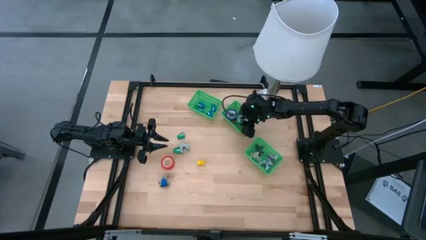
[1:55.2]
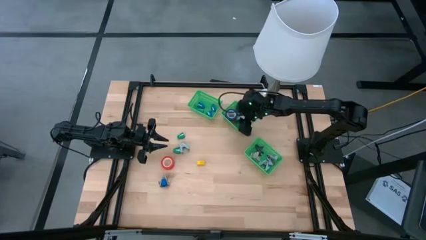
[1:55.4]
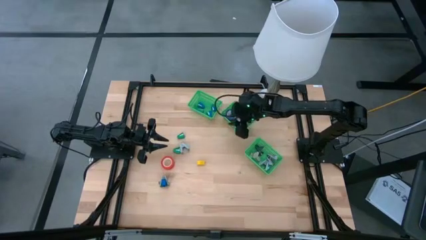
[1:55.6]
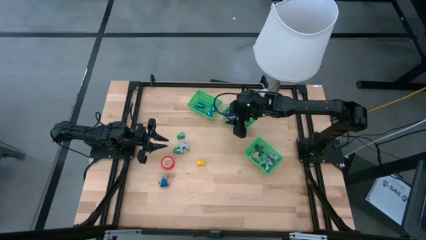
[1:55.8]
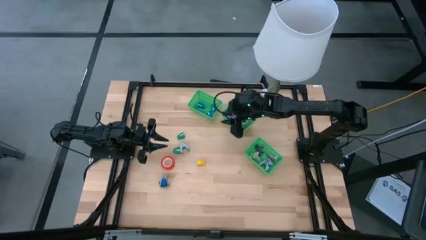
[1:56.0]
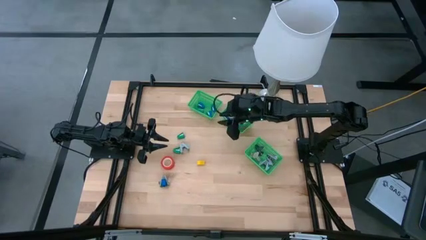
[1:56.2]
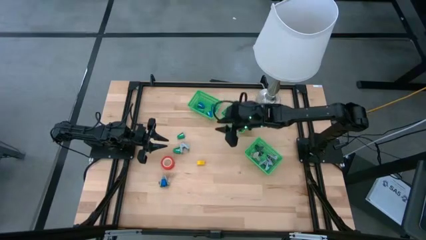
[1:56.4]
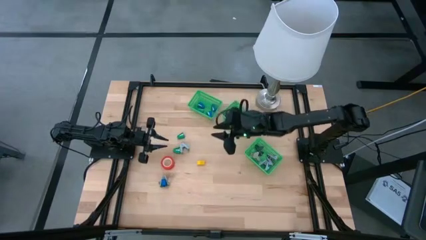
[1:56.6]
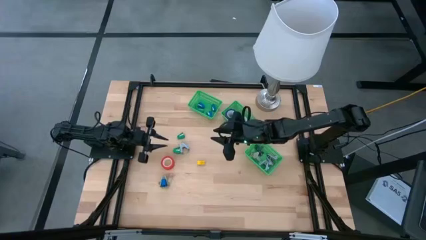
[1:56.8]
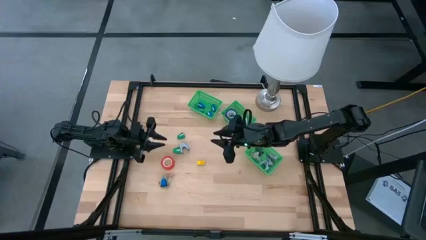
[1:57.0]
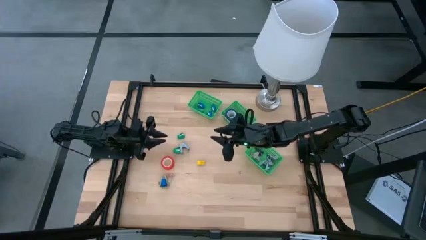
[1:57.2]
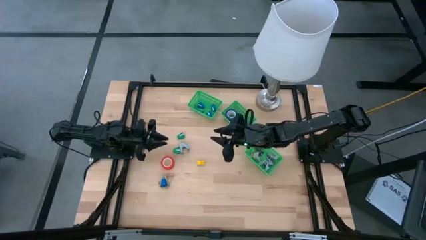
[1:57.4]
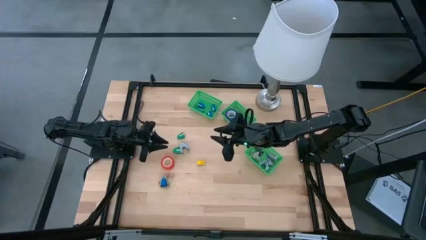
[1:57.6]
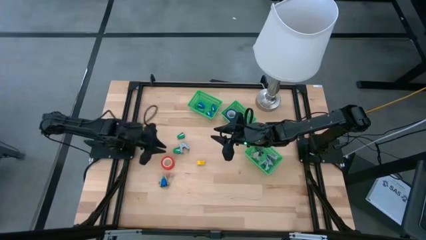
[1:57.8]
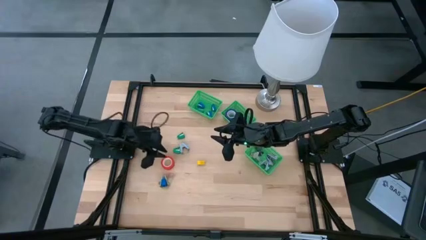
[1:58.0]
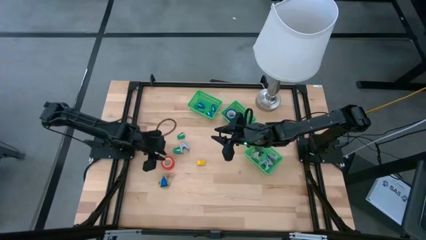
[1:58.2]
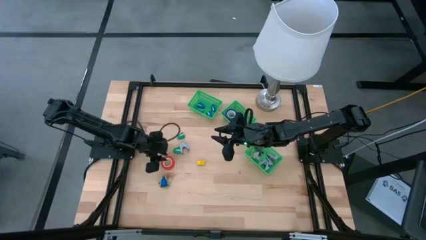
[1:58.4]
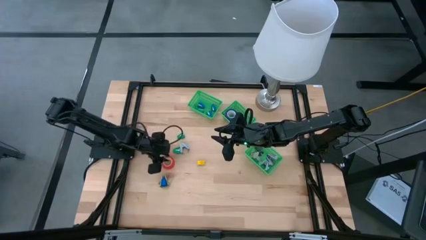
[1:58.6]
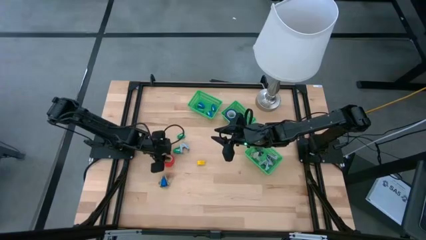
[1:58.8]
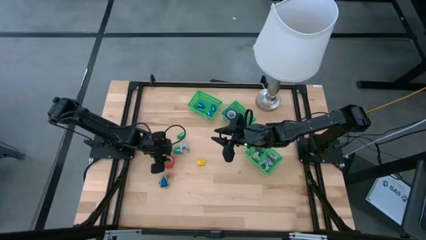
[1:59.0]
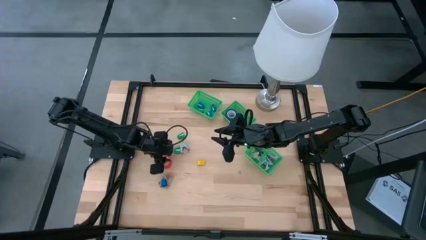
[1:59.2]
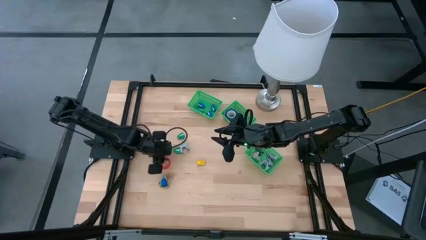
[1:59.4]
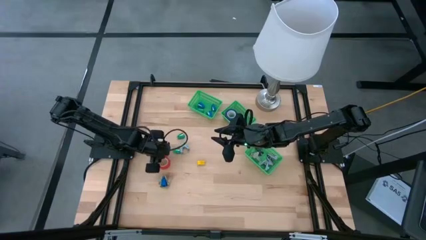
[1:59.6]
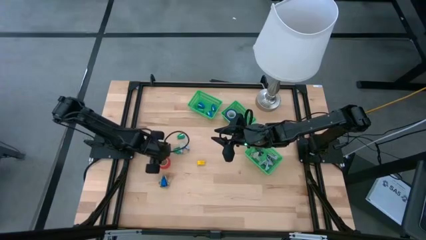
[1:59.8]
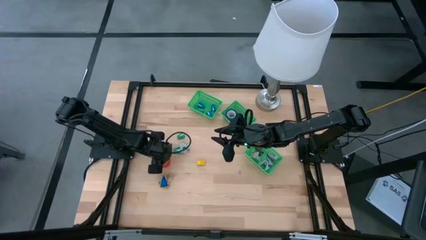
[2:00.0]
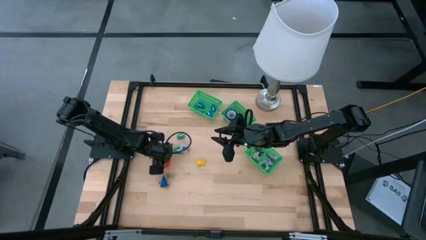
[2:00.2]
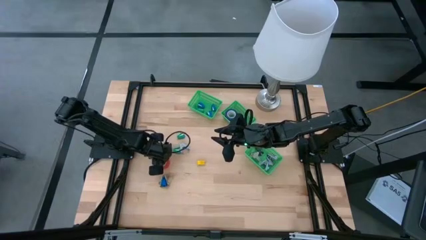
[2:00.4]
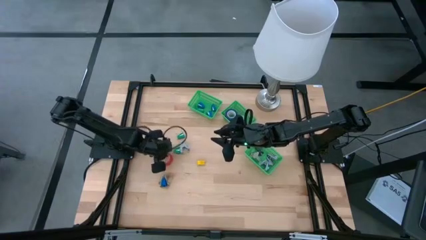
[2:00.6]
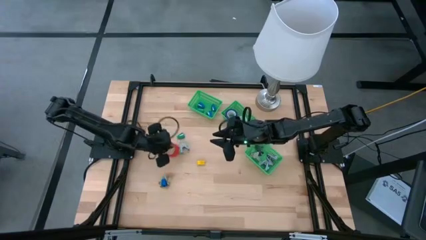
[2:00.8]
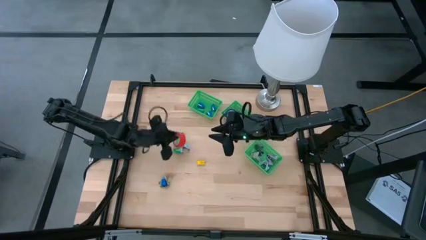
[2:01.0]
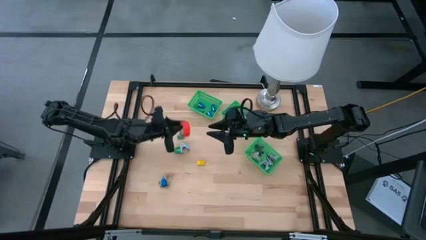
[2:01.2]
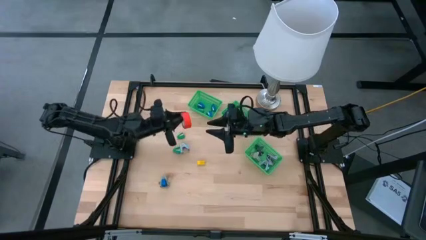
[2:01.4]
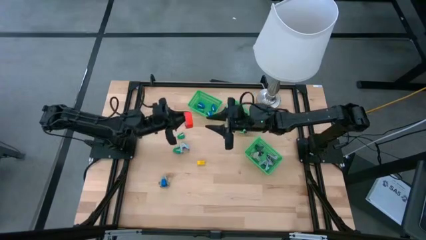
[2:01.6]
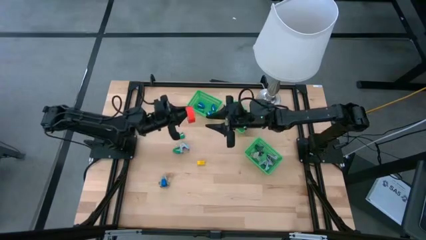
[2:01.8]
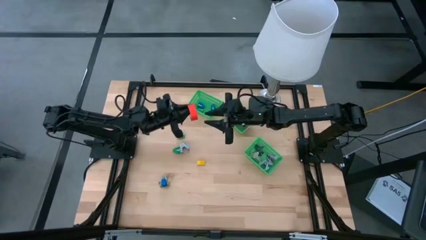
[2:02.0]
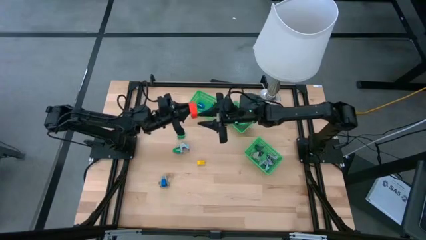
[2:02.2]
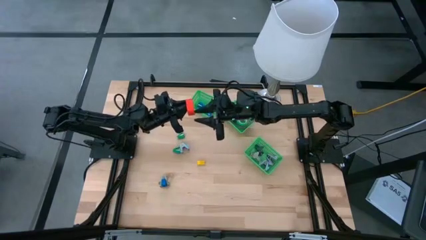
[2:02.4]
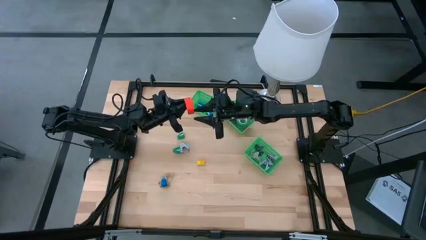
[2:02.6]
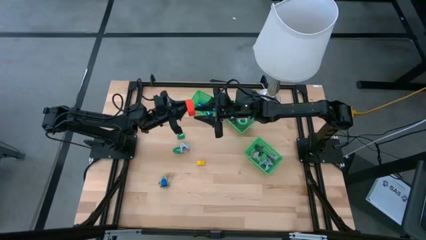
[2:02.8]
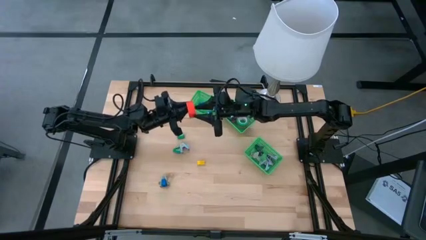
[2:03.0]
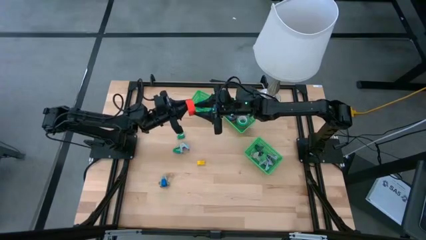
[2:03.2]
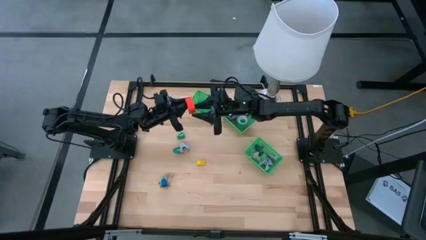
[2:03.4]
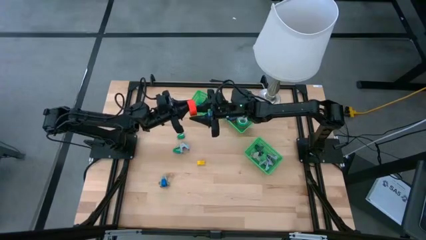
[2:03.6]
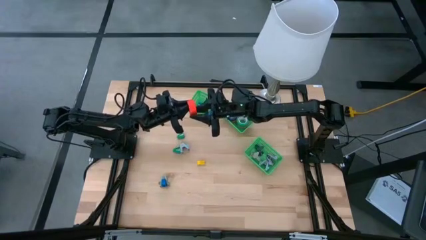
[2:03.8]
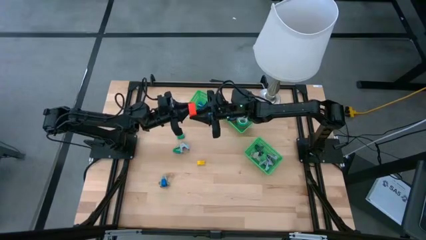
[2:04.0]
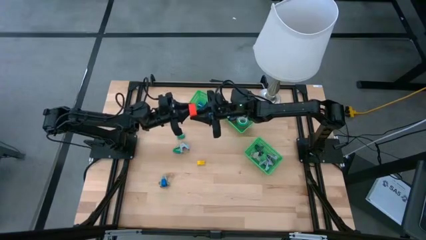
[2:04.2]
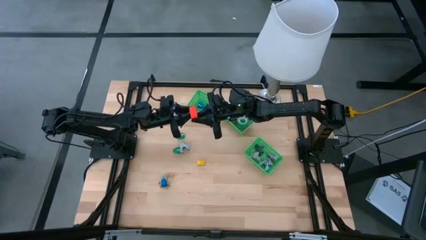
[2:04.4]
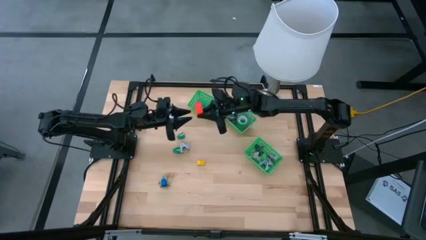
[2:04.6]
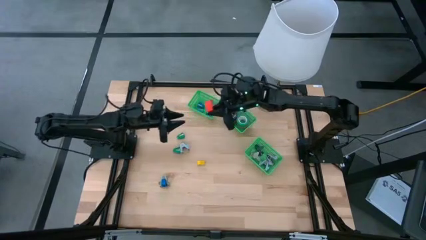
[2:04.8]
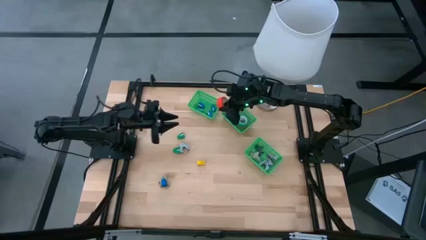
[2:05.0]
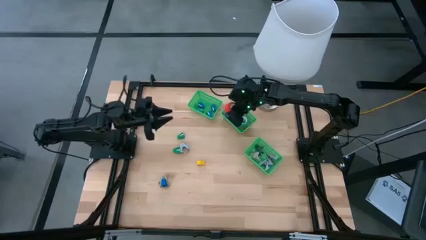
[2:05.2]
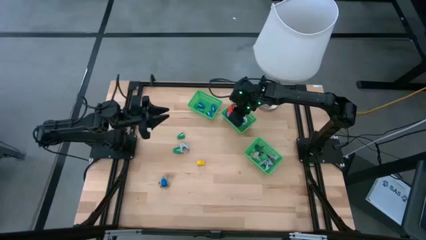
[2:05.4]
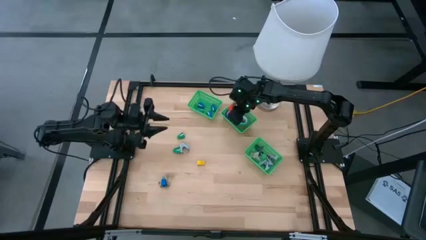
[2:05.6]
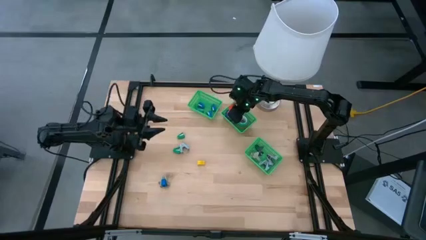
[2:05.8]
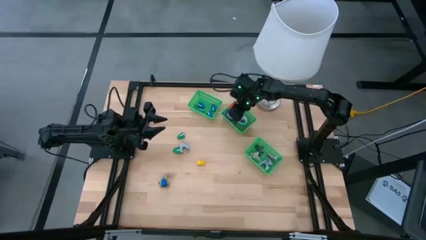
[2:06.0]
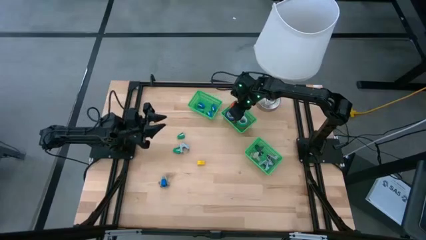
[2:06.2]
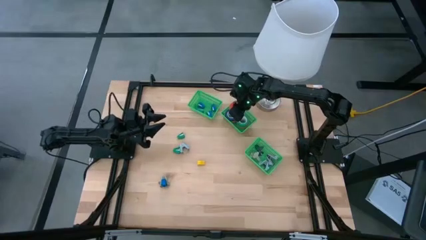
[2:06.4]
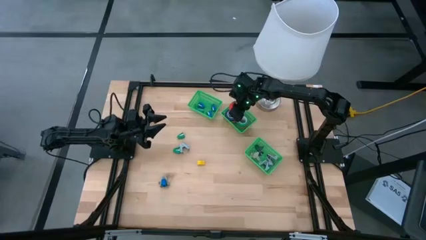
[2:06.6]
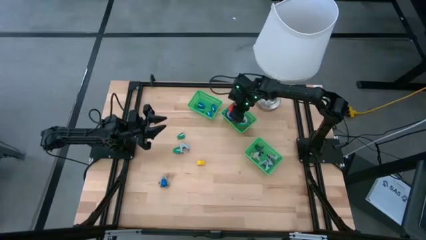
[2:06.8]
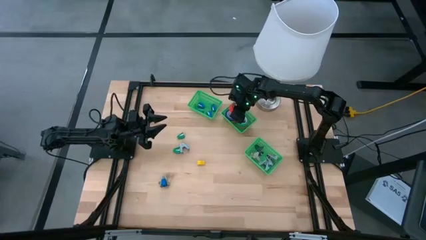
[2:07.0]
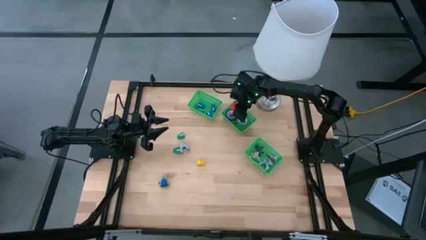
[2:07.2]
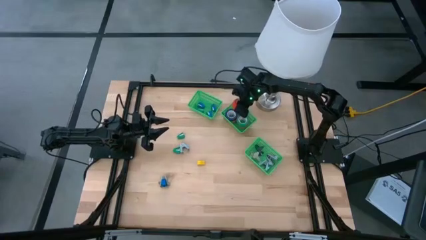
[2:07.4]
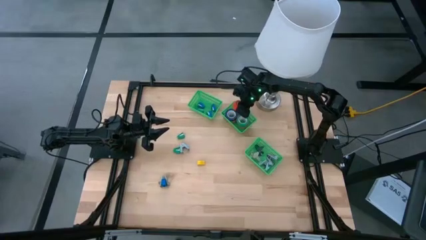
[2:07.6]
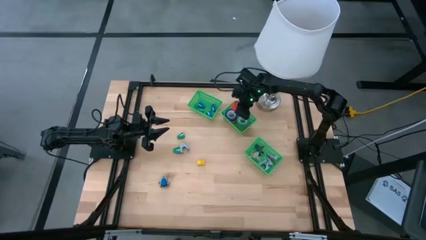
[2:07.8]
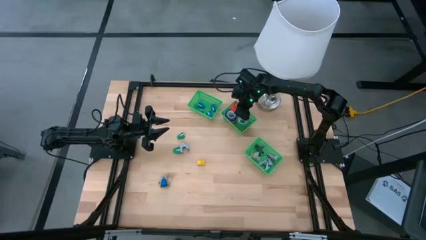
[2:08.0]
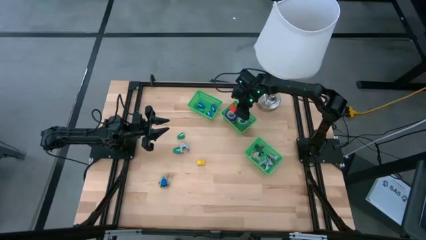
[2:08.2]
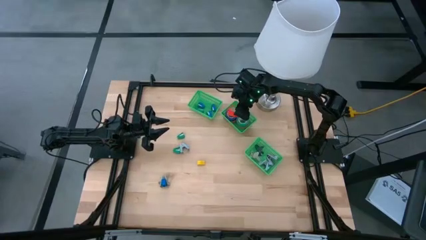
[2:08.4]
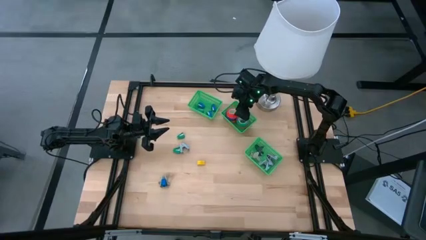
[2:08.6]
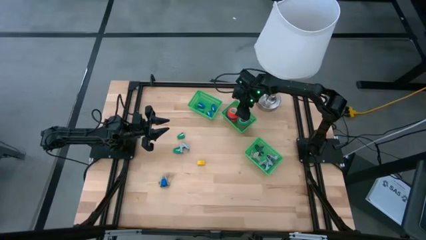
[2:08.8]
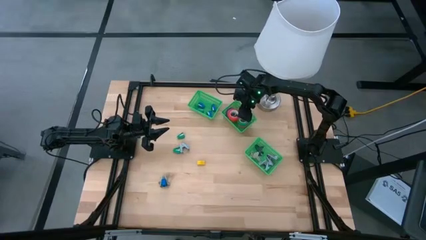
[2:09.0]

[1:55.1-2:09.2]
Task: Pick and place Stapler, Stapler remover, tape
Put the red tape into the middle basket
